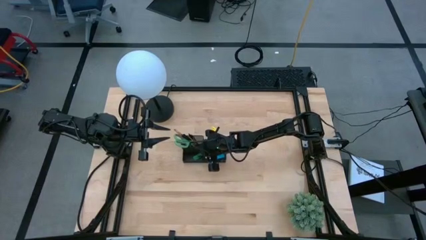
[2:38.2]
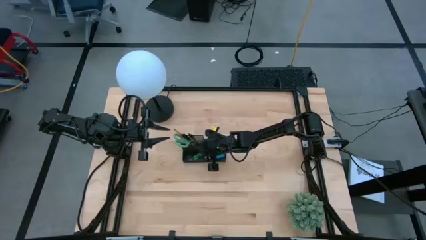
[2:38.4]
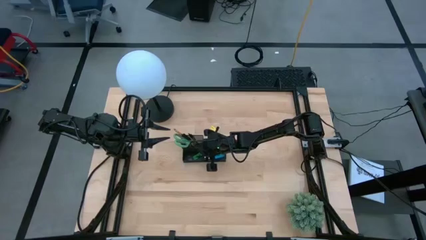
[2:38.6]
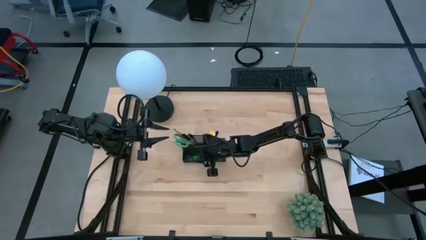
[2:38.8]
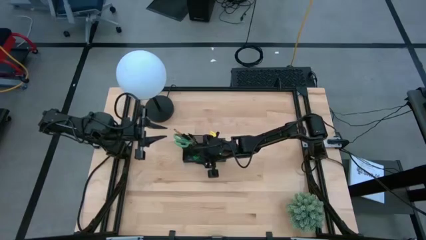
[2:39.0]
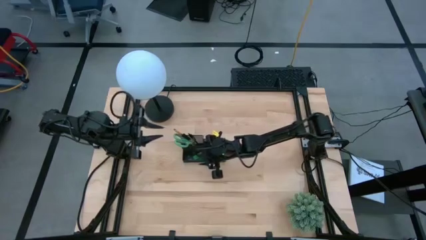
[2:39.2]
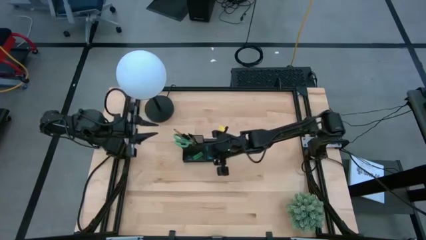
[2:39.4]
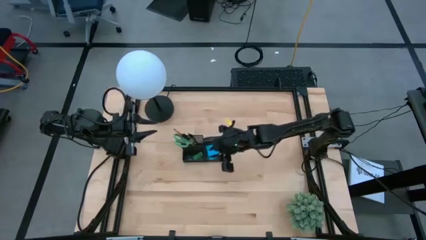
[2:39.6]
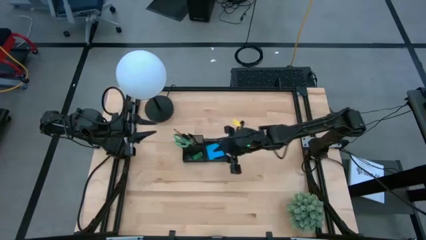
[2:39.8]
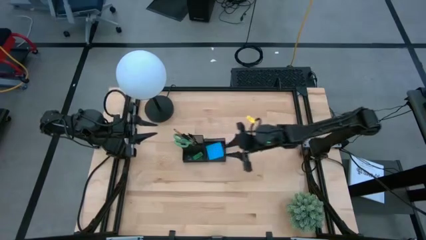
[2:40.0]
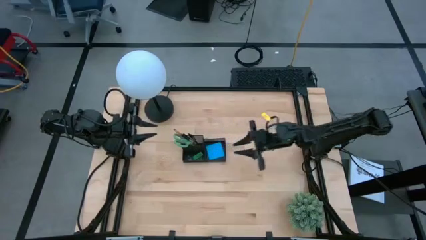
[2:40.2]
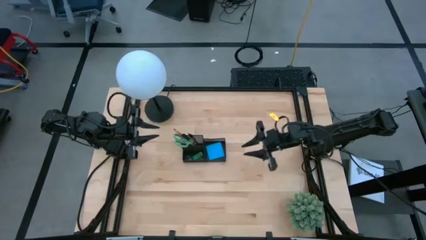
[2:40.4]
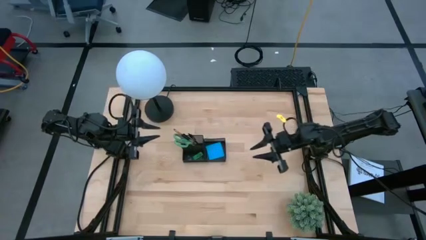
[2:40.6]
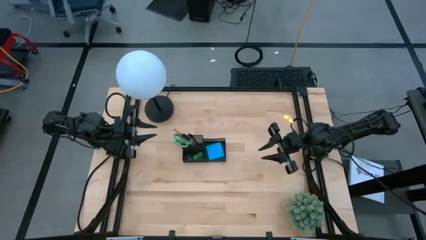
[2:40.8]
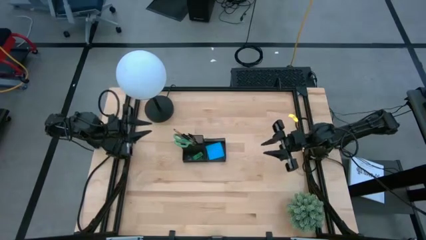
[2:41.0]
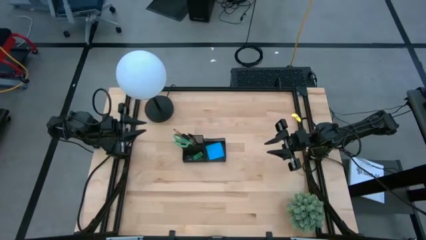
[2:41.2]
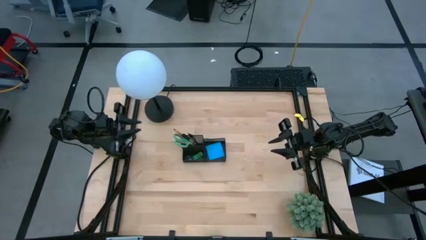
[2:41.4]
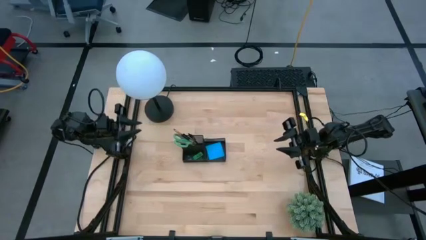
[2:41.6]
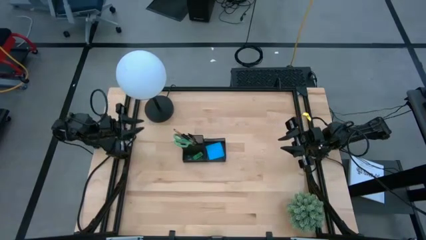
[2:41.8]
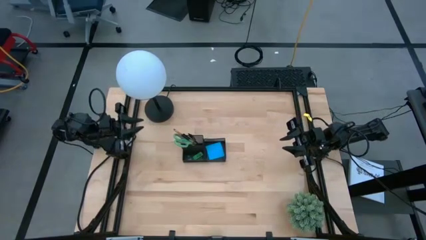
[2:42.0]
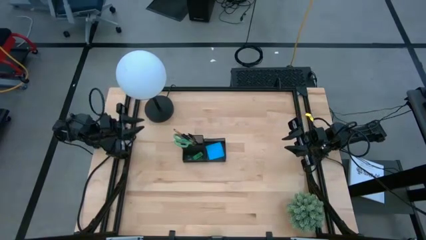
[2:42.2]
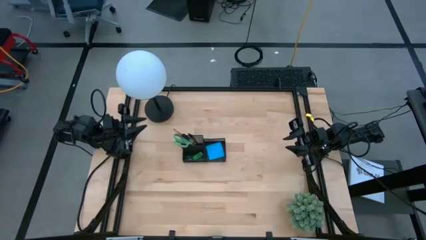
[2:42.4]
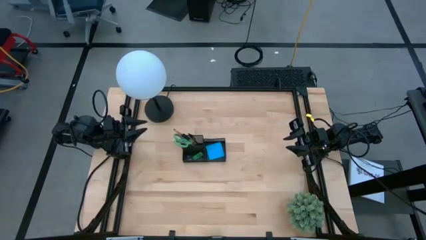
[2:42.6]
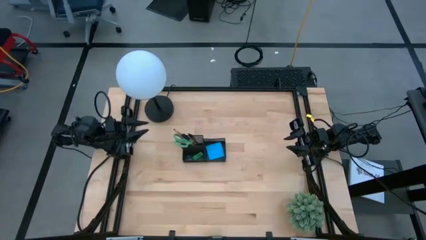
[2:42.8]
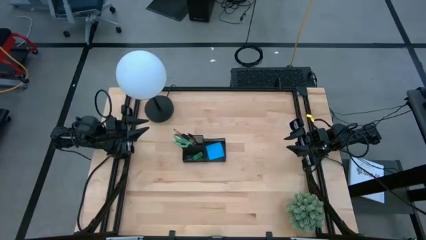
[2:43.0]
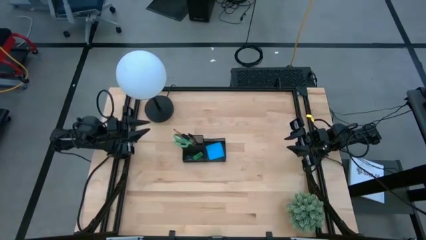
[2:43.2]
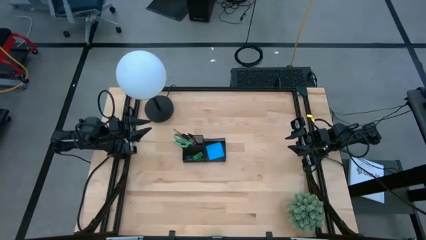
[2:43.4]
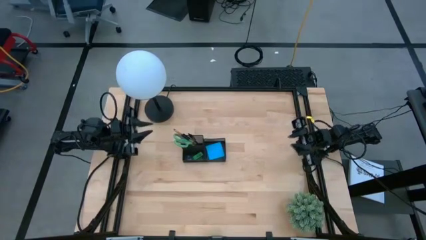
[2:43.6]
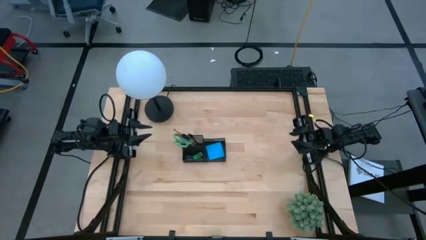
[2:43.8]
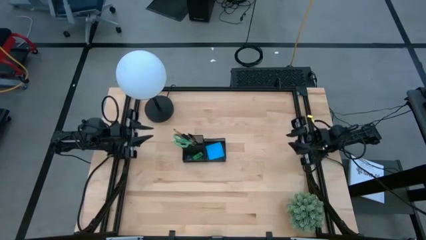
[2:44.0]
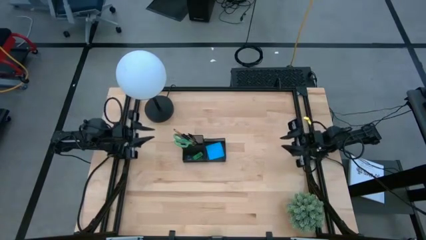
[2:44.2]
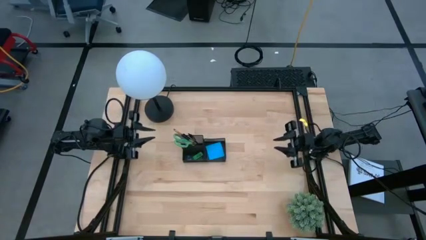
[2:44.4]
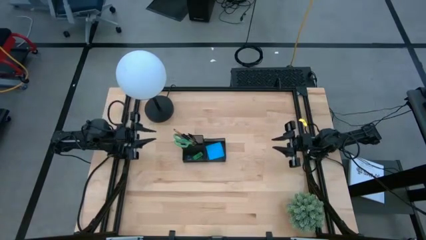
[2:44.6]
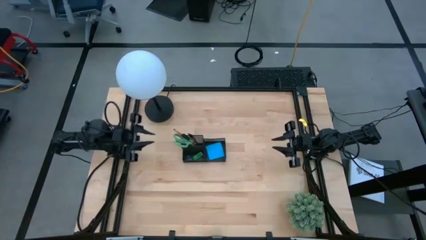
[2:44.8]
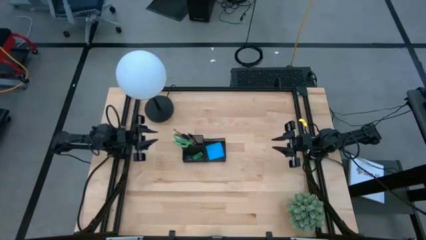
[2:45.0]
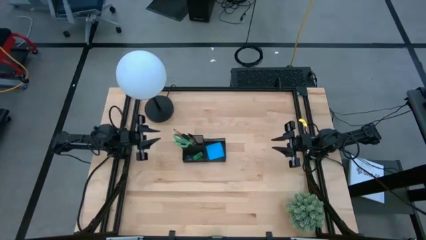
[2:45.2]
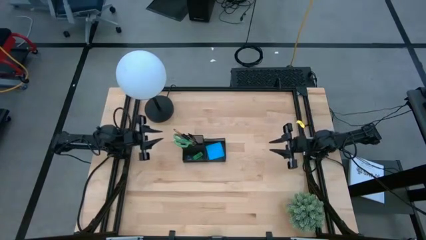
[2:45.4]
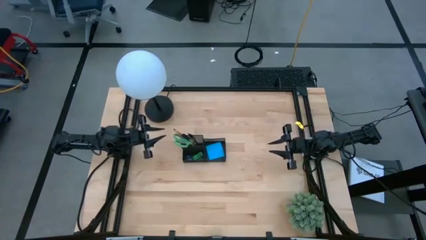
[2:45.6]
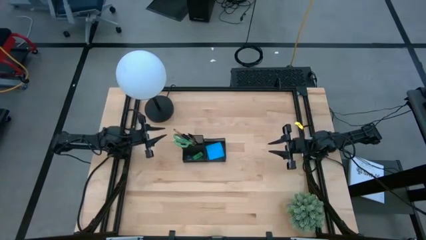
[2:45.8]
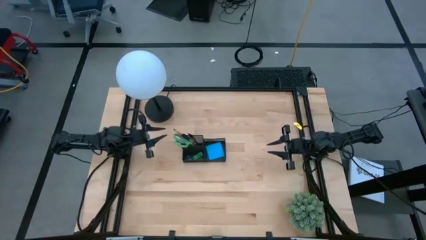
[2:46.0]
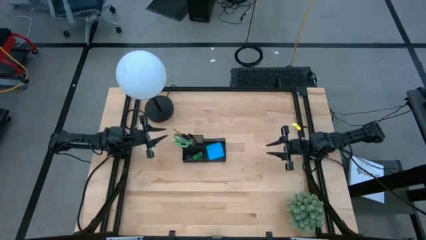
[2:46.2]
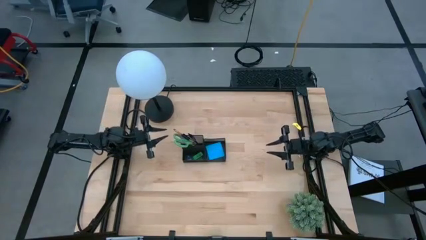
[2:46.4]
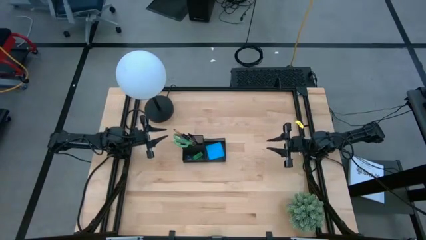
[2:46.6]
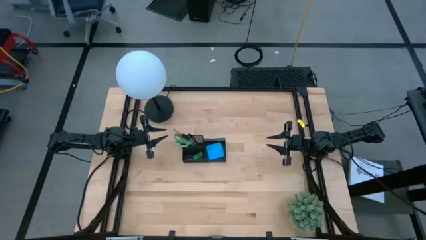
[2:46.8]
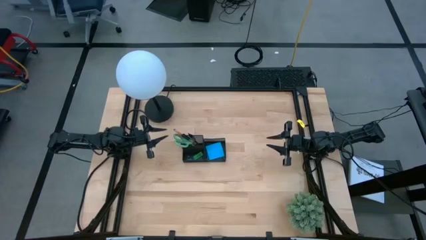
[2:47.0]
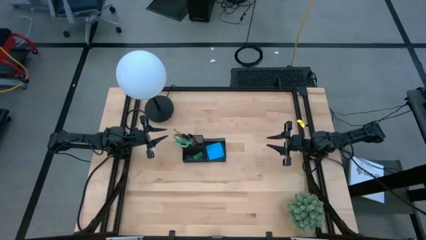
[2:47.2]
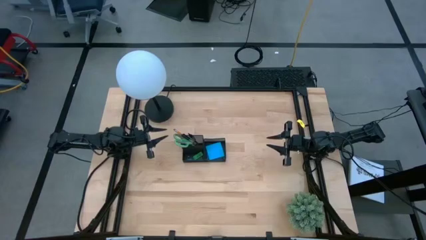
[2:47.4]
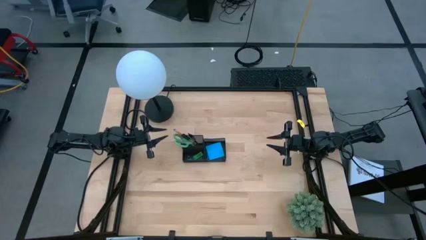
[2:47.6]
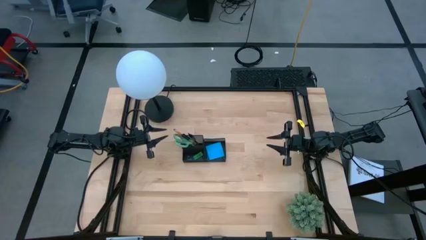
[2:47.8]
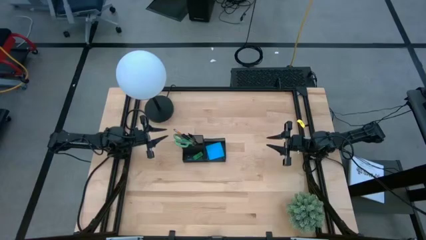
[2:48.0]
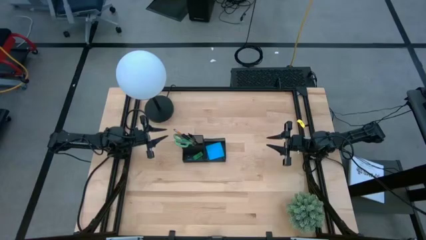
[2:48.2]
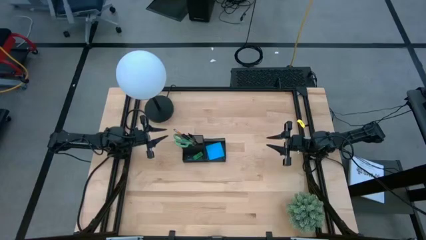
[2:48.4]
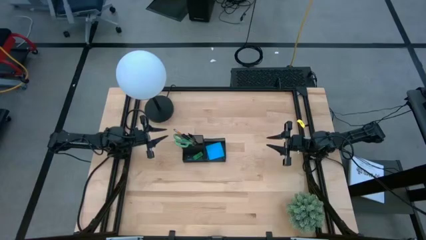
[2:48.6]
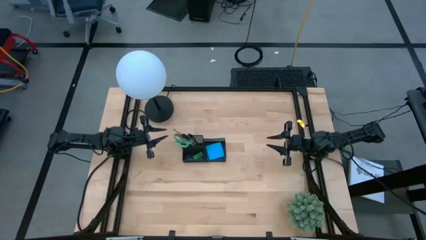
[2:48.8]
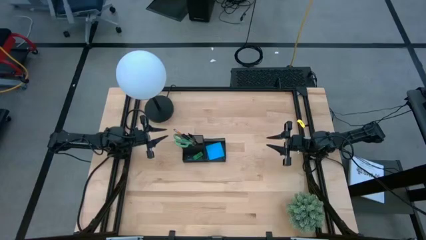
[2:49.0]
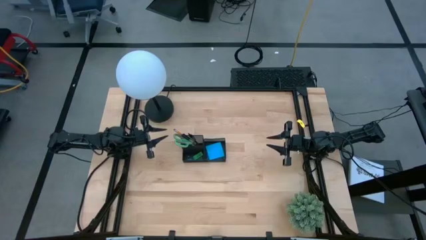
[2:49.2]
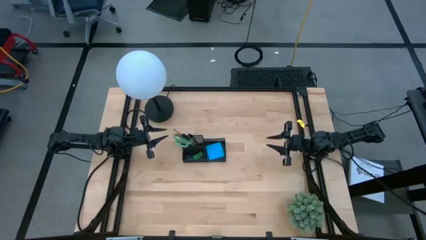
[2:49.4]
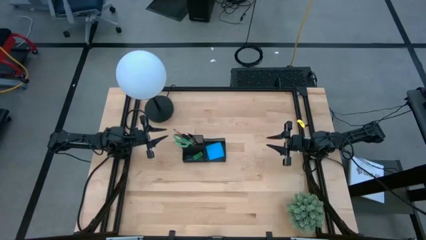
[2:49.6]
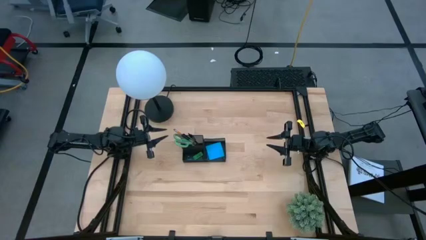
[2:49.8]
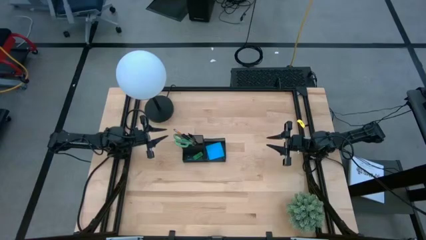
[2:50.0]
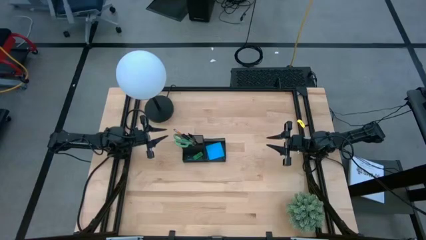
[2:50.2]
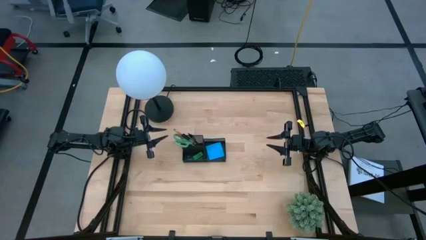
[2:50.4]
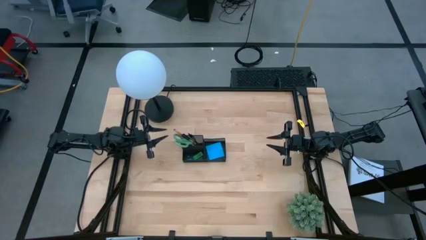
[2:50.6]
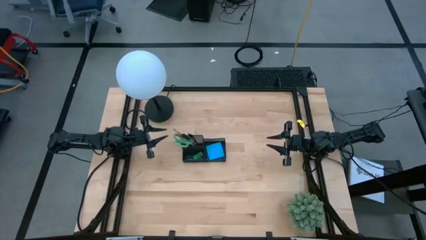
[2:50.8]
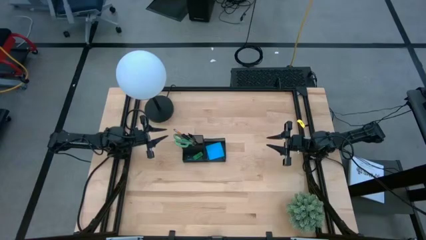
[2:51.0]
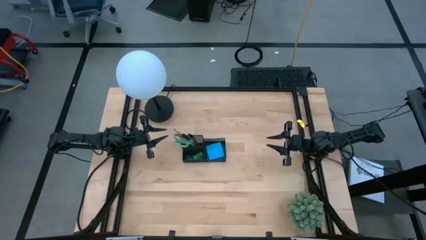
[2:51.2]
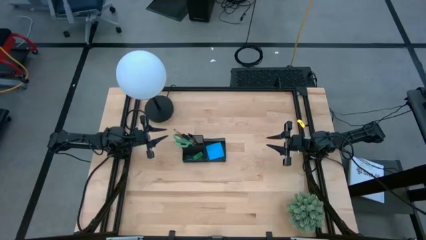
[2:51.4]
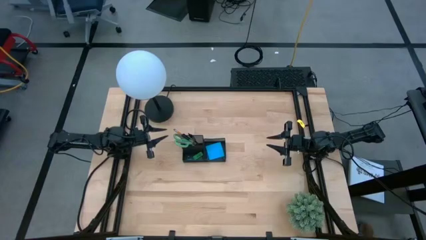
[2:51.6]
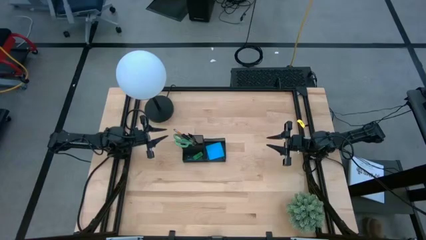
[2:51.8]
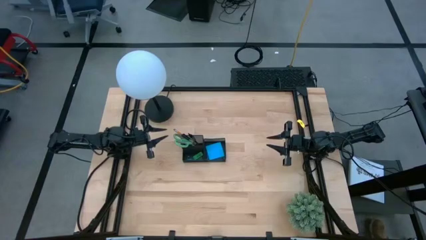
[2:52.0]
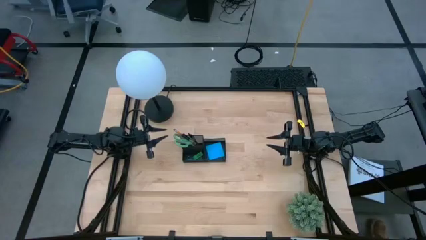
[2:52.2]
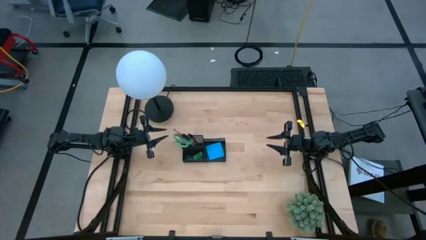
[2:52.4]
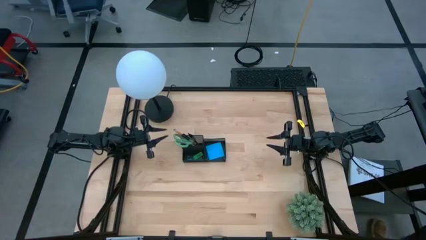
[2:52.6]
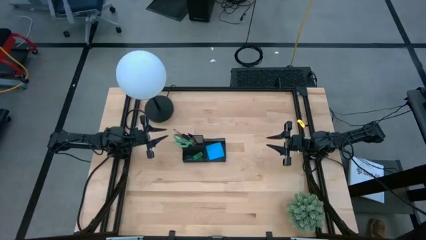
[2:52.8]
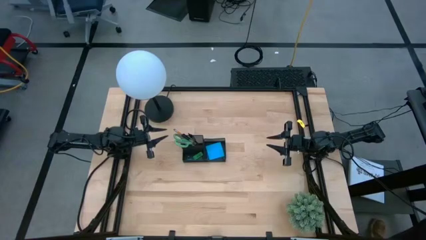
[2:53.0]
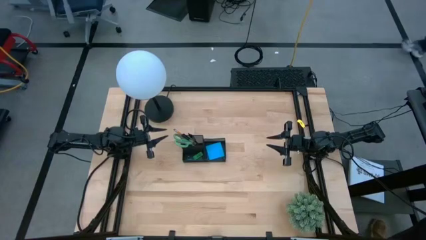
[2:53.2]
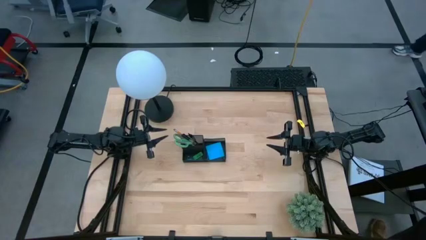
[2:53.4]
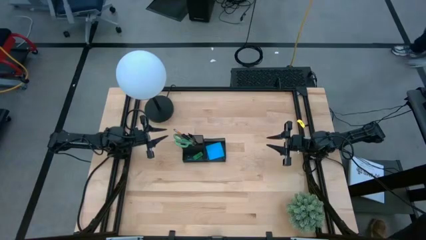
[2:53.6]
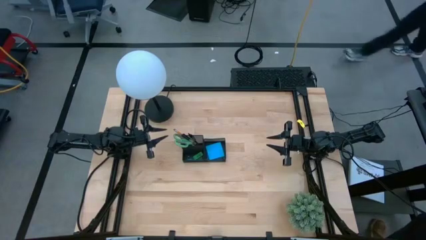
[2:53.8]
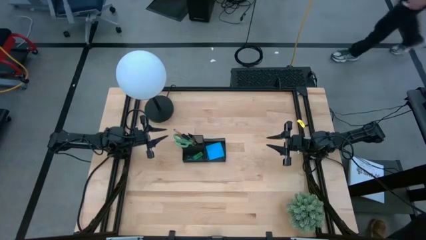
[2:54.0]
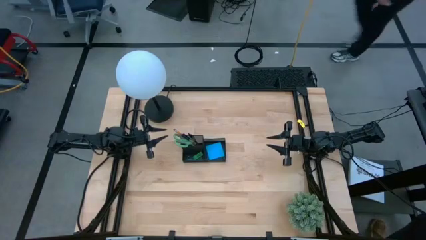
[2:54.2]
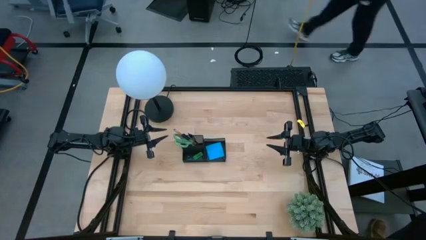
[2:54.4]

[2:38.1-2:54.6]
Task: Pick and place office supplies into organizer
Return to Home Position
